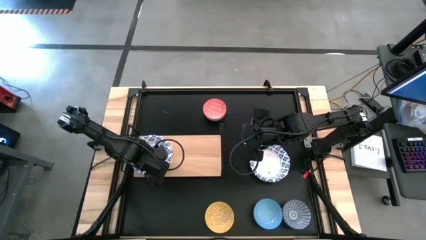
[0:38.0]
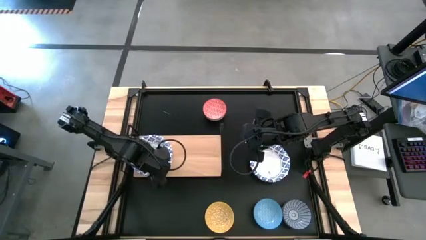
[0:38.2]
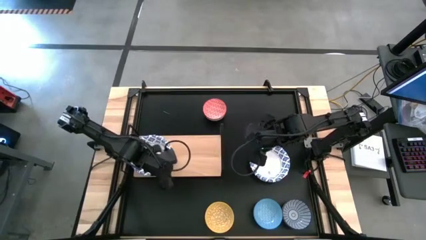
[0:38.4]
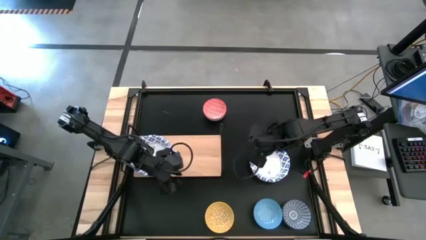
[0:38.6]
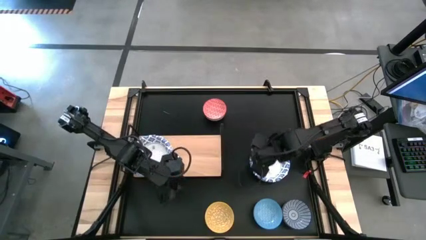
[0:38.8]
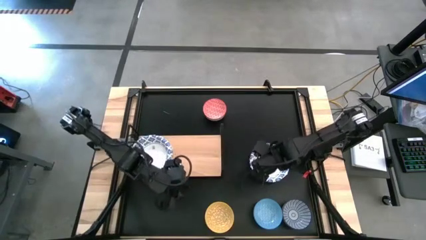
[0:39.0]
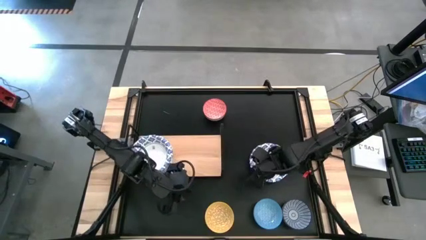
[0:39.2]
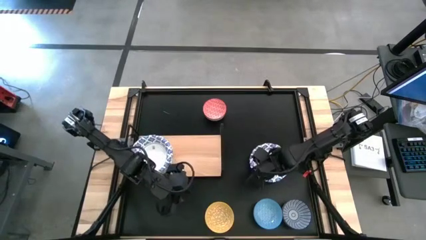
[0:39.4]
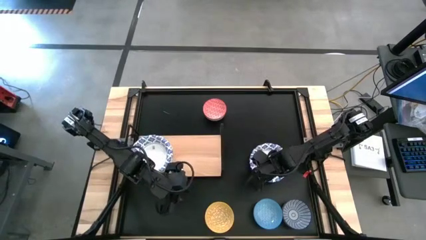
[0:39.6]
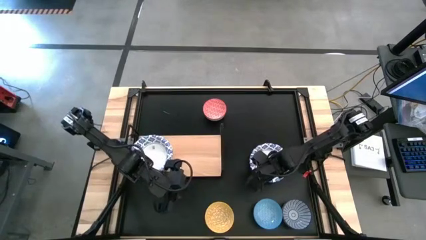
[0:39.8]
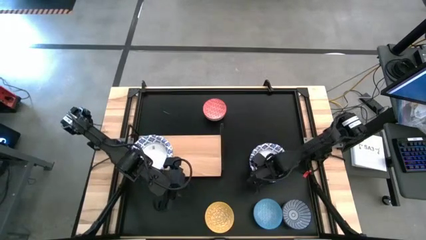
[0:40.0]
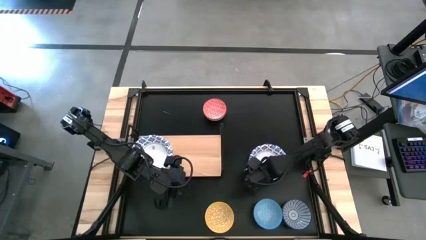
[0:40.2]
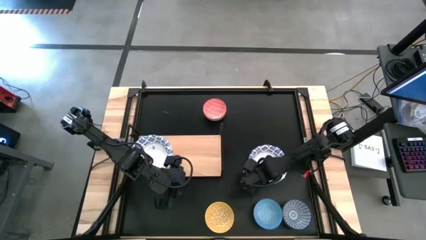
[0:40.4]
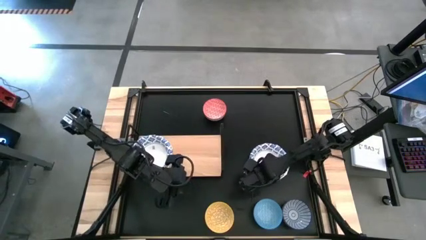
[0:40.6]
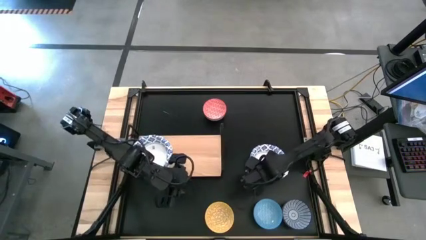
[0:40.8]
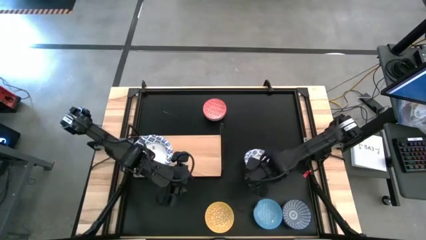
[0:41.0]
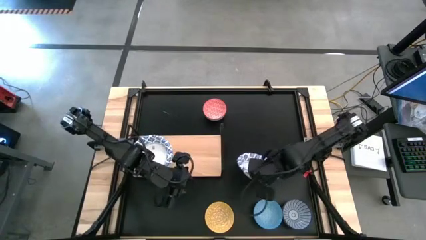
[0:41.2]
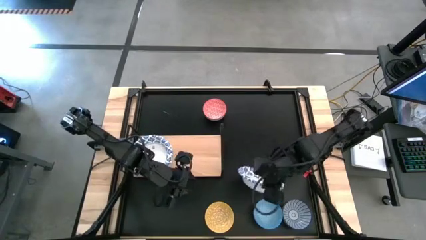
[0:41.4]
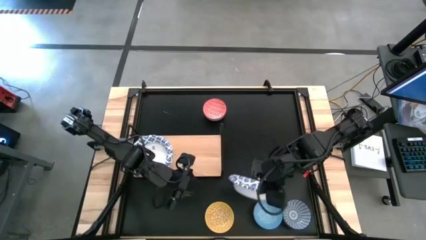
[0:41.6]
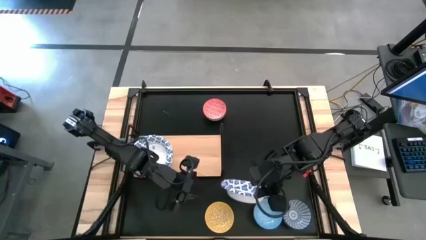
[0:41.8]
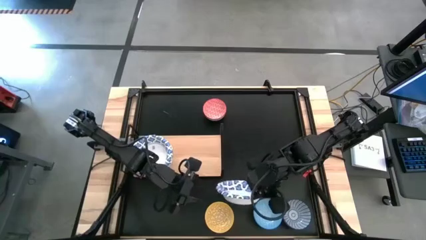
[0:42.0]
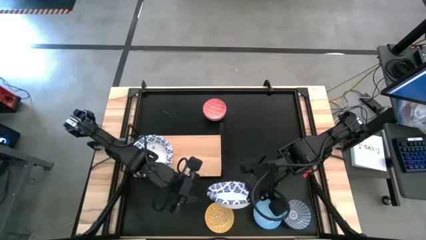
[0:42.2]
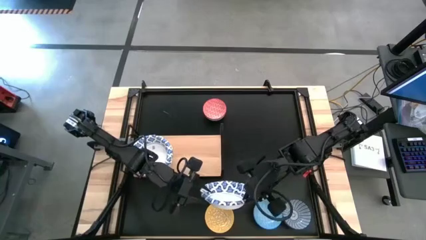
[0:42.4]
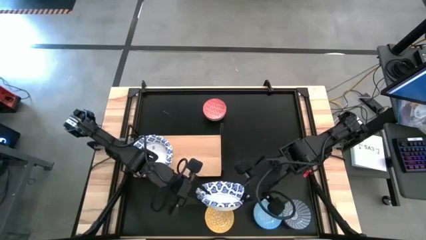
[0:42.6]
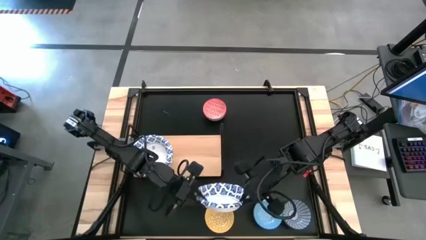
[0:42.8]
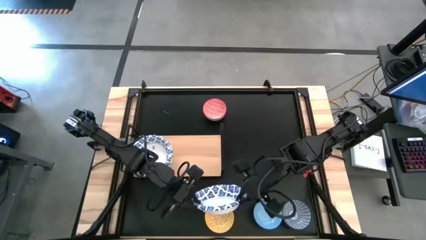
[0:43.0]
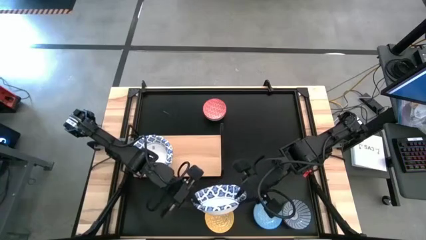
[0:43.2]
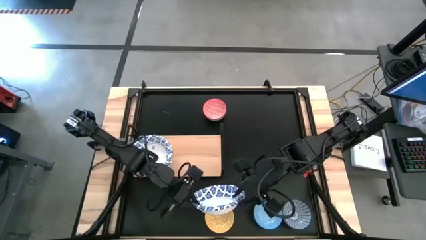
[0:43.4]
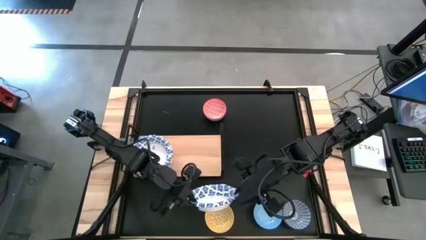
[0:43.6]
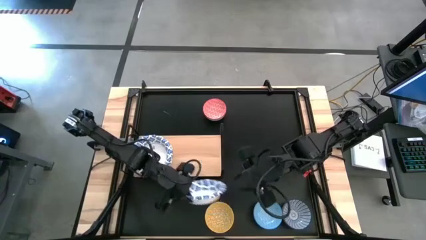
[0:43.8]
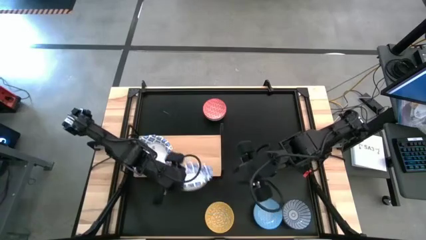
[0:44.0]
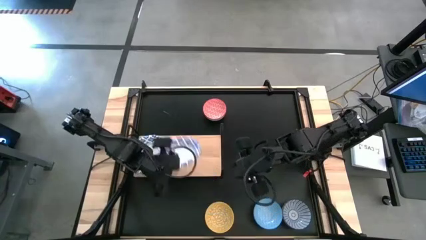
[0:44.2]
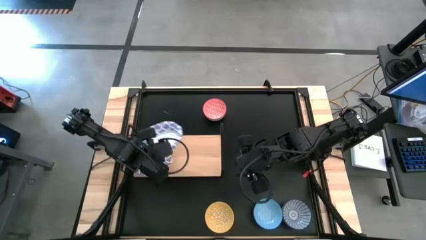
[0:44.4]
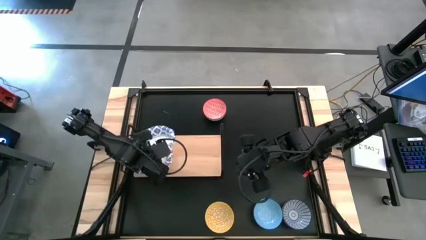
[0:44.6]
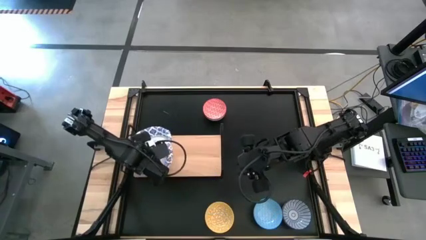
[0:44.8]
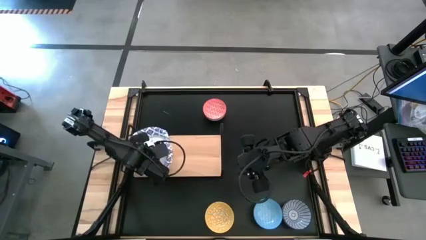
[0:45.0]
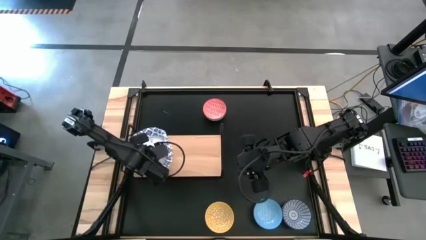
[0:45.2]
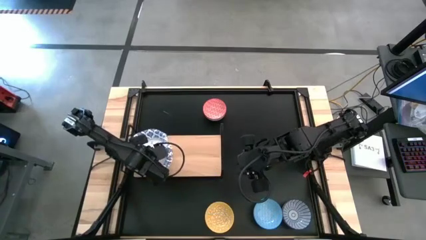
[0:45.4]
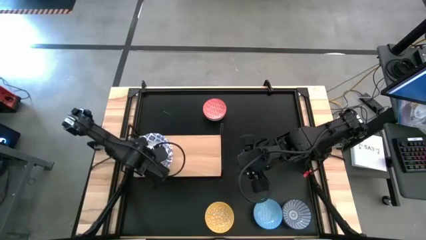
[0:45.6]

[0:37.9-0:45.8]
Task: Place and stack bowls onto a shelf
Stack the blue patterned bowl on top of the blue patterned bowl on the shelf

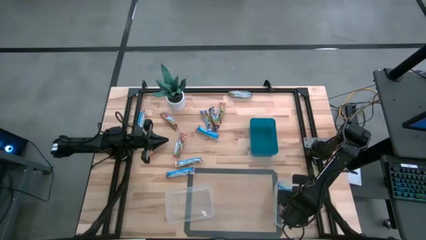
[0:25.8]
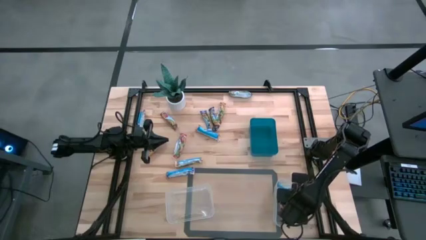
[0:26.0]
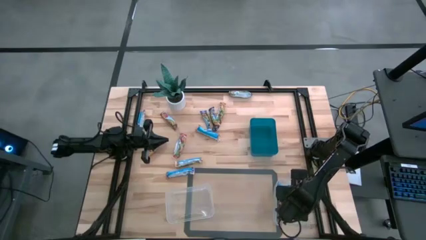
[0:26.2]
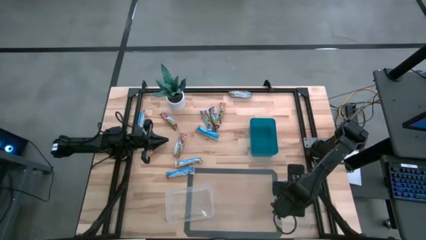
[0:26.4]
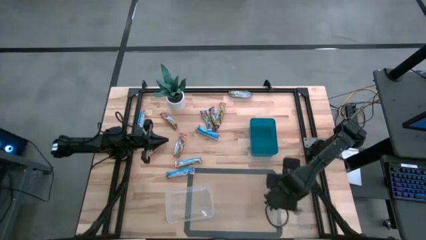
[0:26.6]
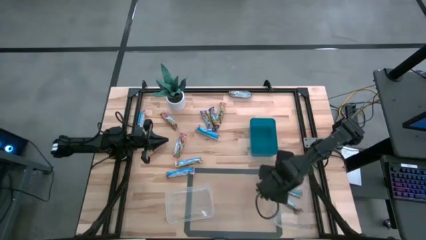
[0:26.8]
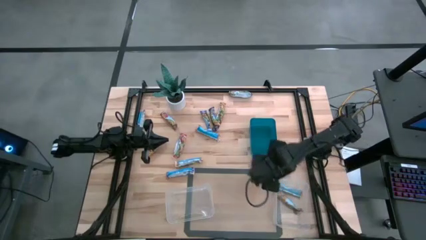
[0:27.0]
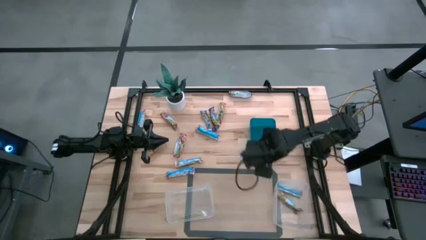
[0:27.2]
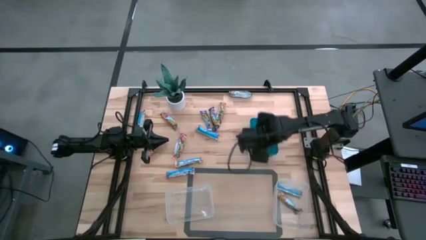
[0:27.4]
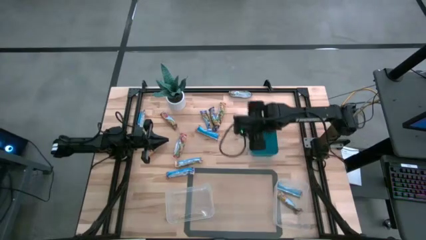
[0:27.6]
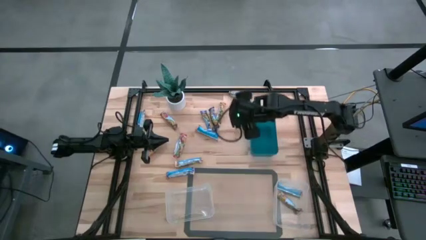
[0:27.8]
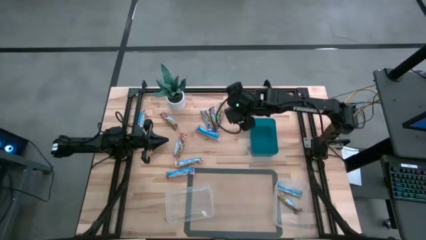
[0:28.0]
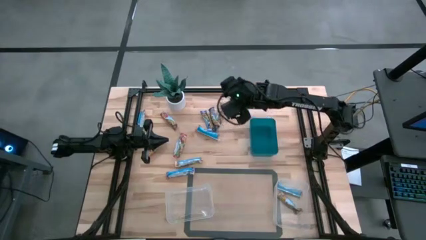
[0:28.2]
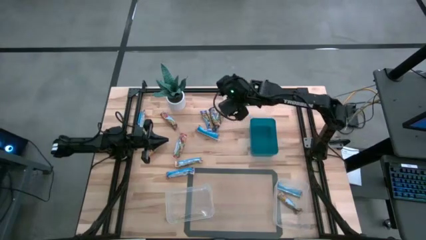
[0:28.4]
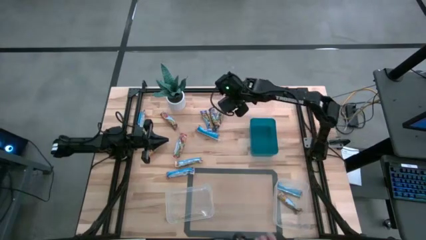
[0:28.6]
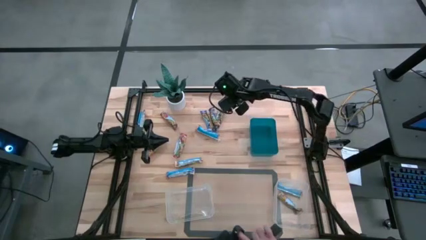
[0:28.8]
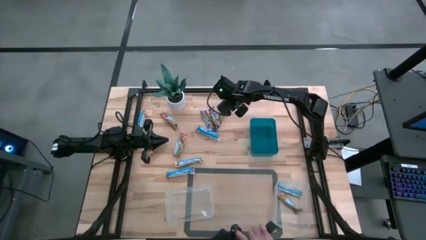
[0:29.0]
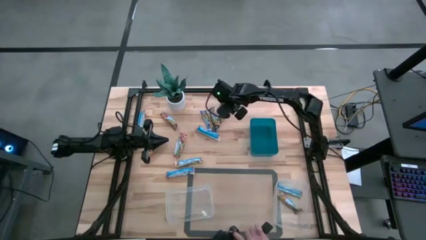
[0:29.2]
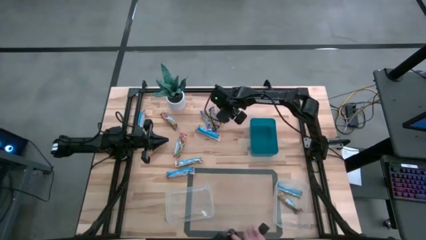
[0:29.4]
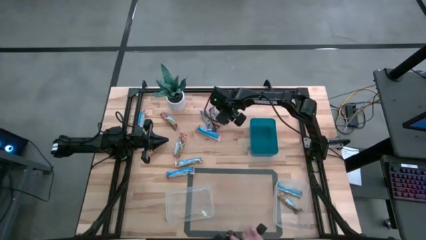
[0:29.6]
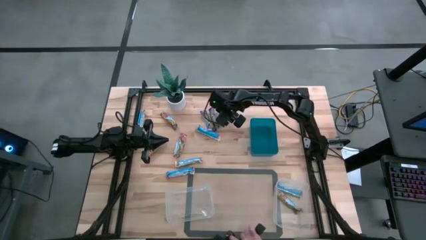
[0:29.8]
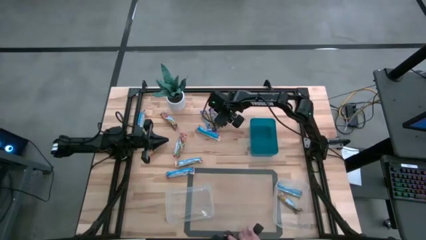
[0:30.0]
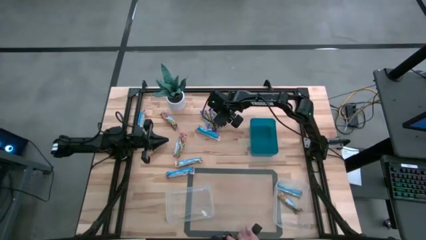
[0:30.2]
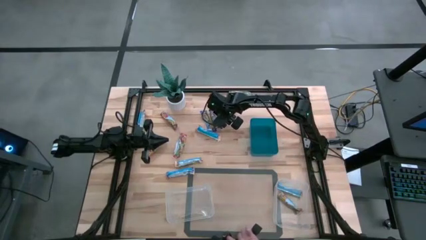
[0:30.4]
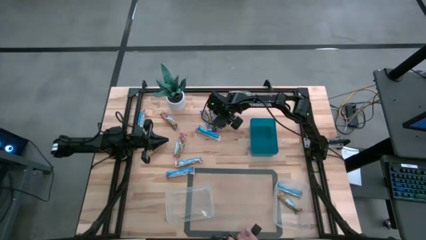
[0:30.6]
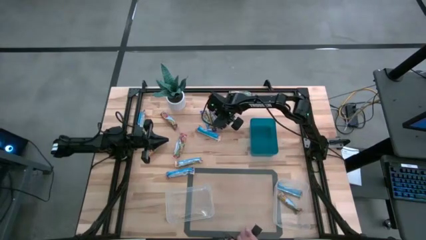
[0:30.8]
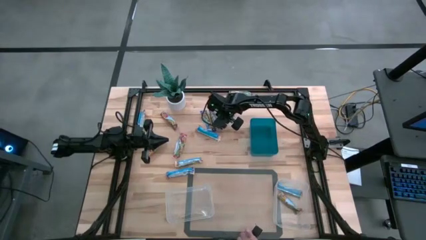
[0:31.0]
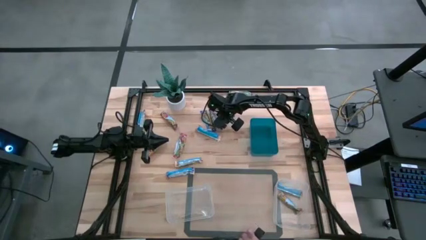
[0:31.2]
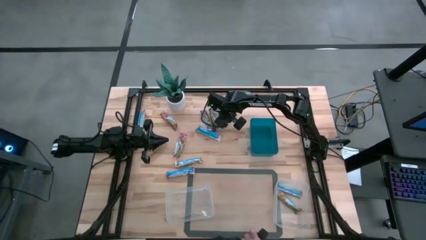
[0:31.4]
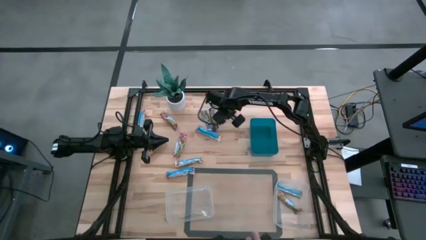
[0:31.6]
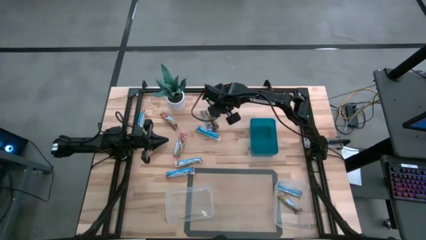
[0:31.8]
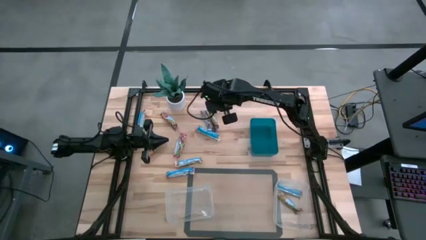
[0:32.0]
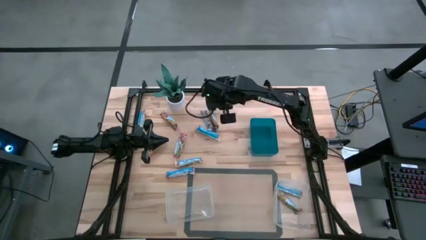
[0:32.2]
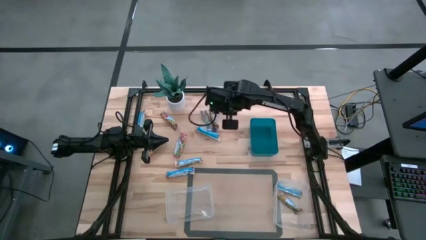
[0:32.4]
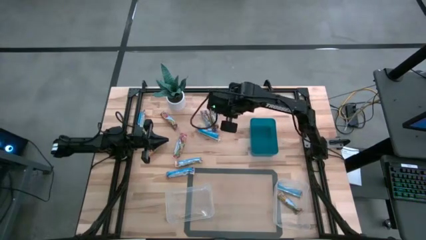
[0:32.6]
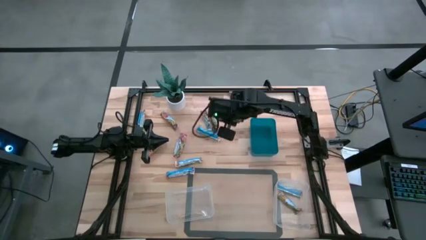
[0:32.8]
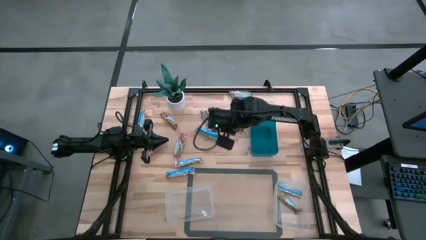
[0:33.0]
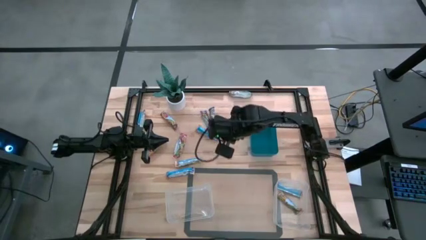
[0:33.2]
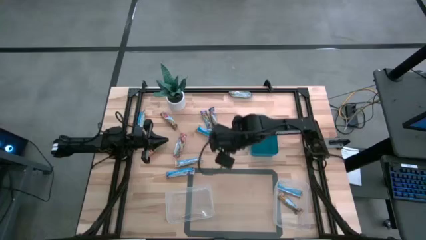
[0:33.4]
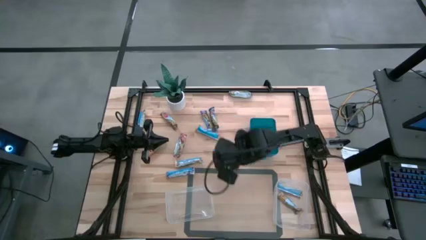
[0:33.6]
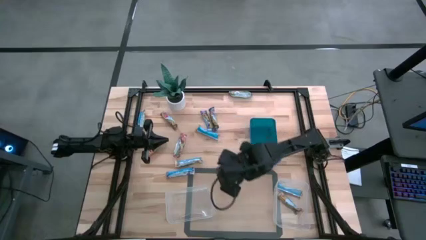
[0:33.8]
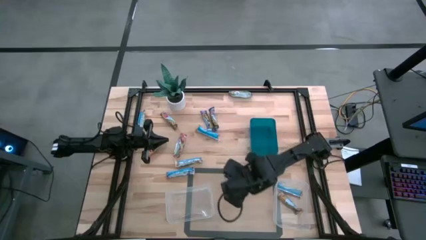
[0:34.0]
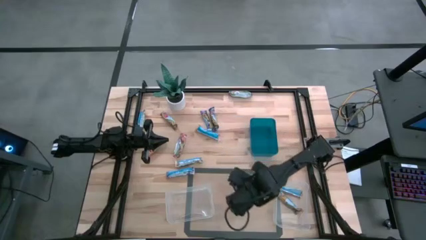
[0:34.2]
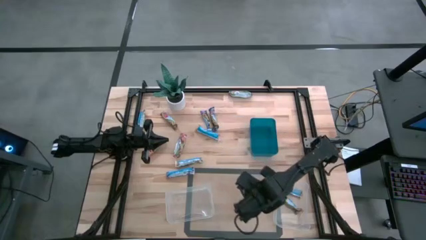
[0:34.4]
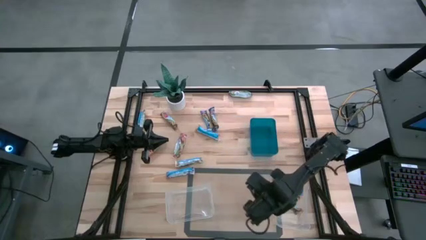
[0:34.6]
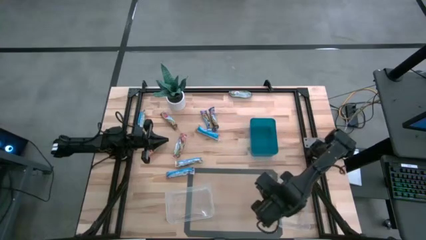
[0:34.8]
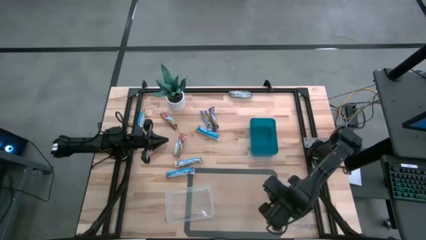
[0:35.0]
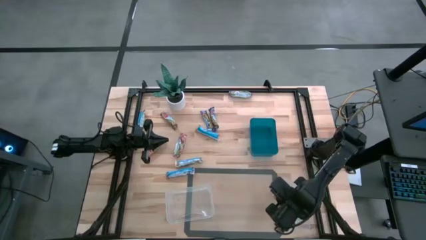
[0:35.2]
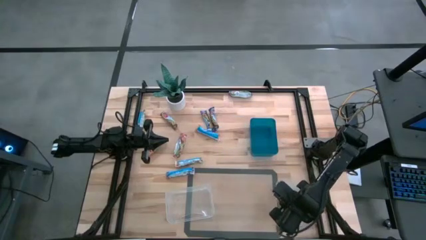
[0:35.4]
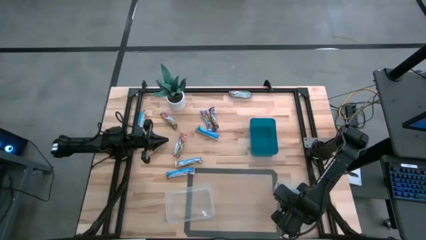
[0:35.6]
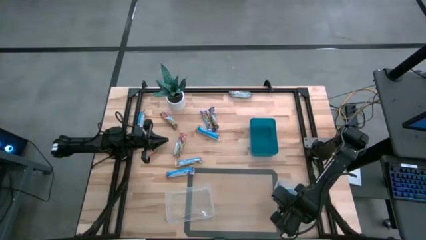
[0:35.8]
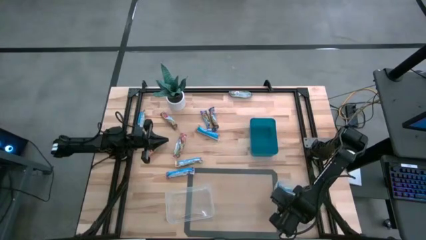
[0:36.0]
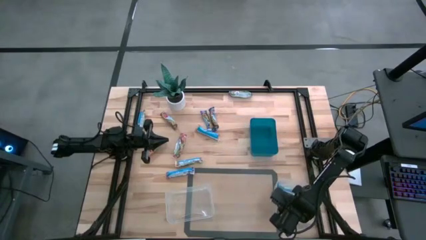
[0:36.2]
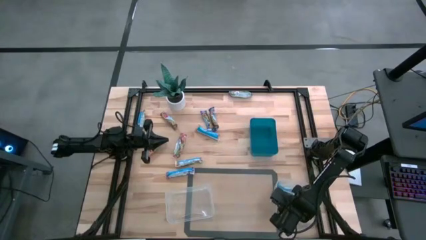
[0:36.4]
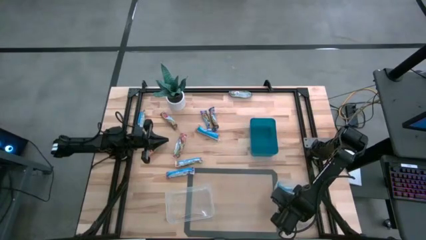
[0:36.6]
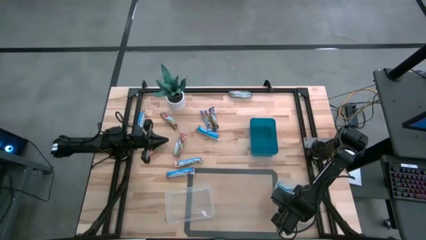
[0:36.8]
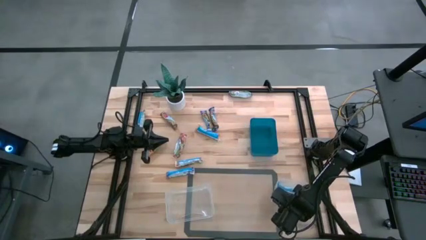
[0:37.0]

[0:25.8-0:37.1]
Task: Pick and place Granola Bars by type
Put the top yellow granola bar into the right transparent bin
